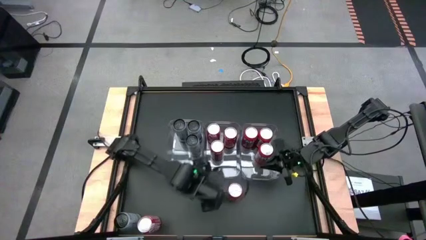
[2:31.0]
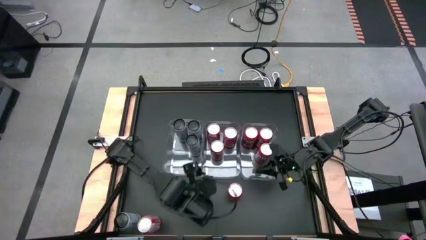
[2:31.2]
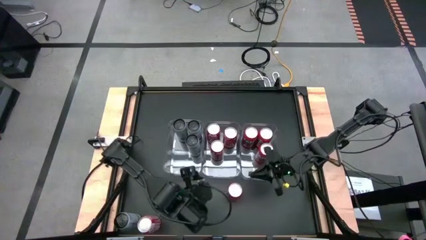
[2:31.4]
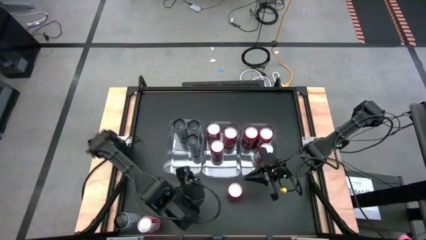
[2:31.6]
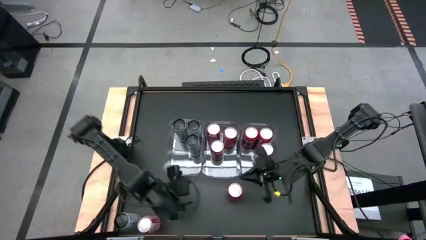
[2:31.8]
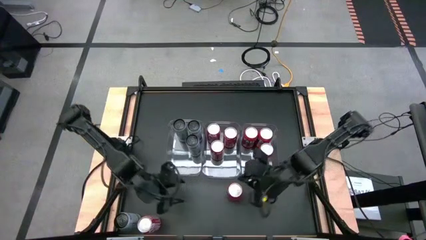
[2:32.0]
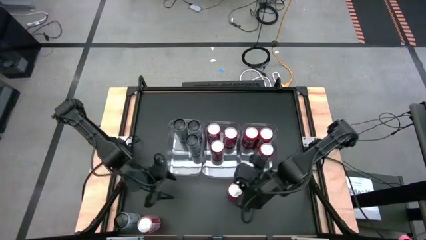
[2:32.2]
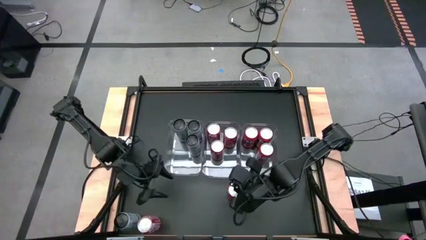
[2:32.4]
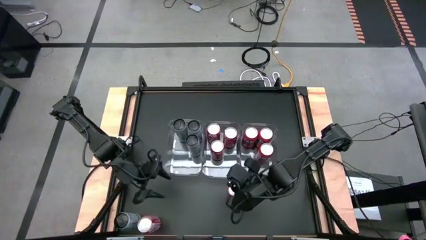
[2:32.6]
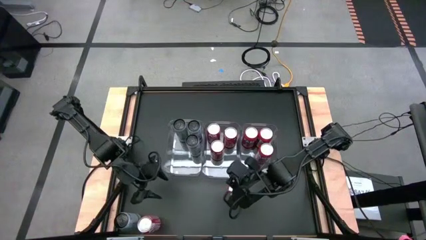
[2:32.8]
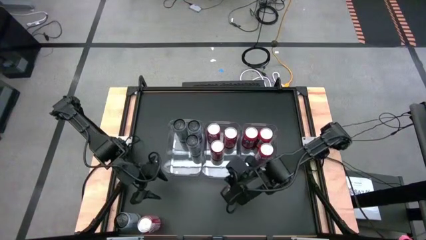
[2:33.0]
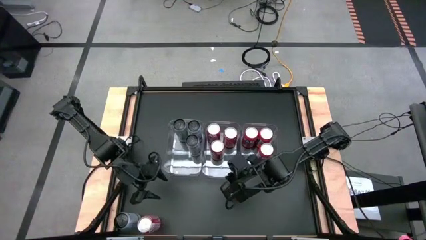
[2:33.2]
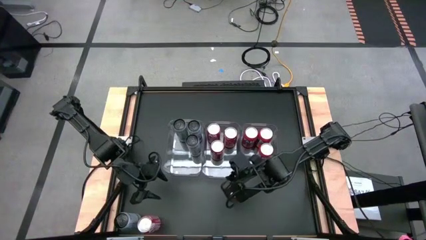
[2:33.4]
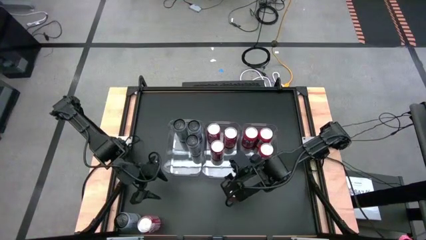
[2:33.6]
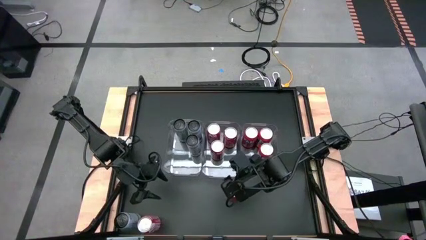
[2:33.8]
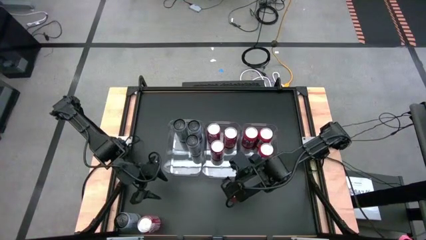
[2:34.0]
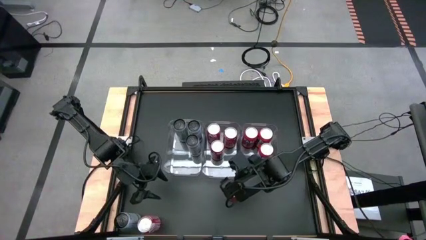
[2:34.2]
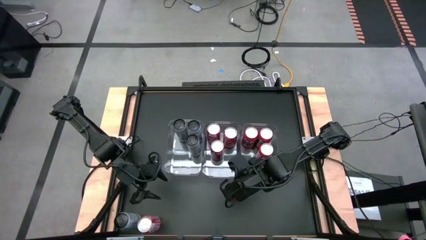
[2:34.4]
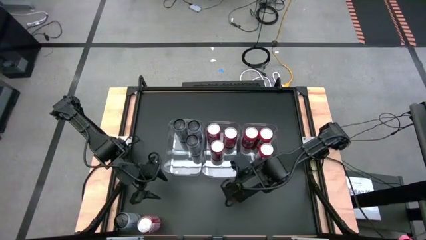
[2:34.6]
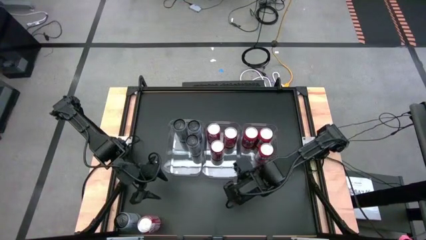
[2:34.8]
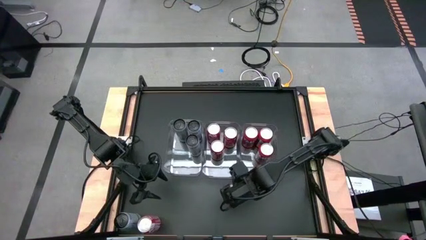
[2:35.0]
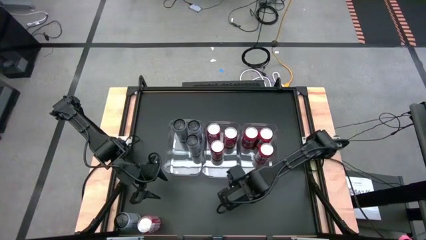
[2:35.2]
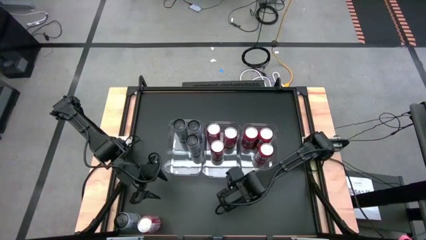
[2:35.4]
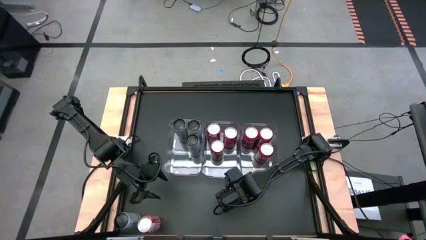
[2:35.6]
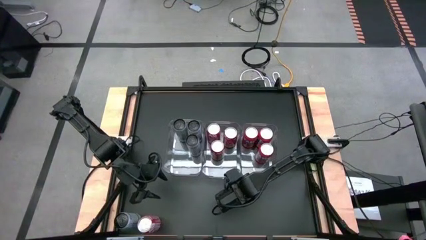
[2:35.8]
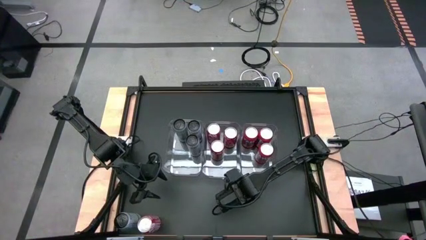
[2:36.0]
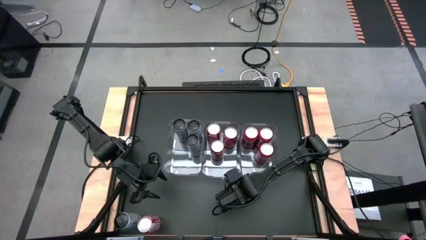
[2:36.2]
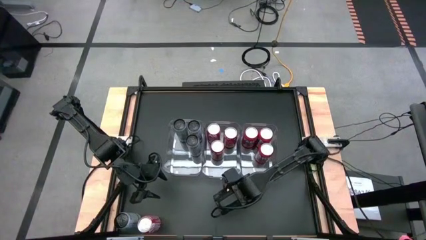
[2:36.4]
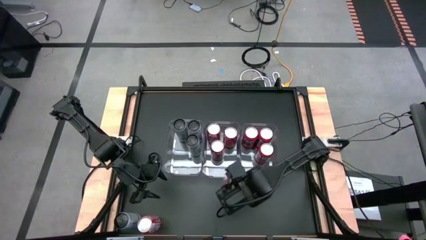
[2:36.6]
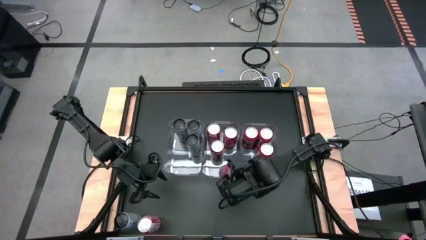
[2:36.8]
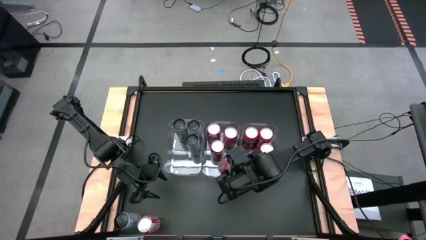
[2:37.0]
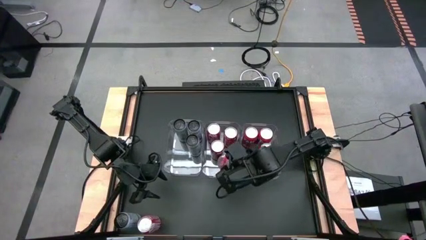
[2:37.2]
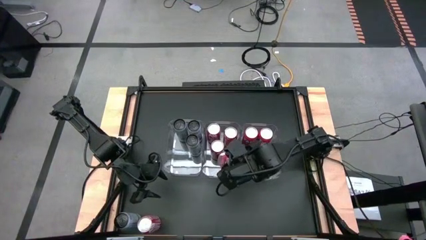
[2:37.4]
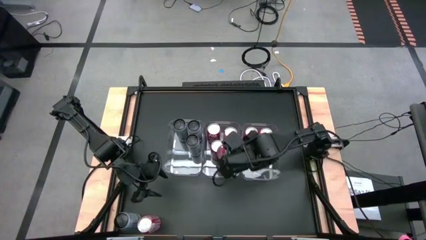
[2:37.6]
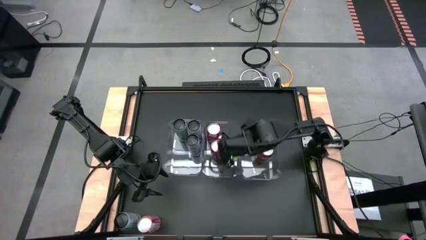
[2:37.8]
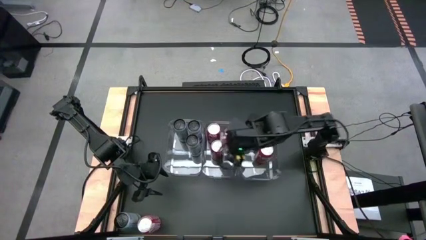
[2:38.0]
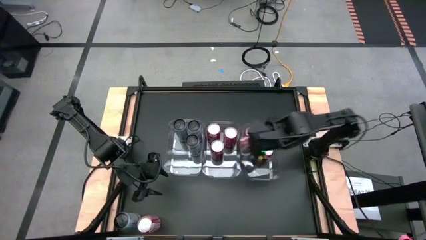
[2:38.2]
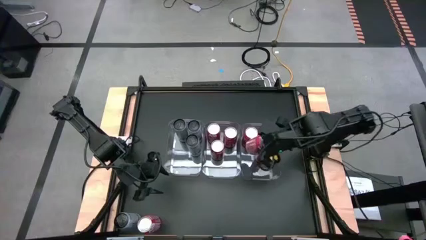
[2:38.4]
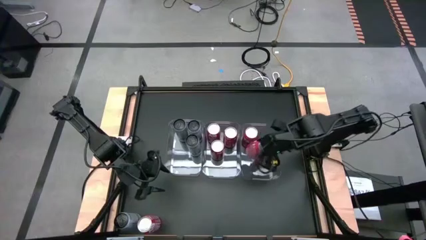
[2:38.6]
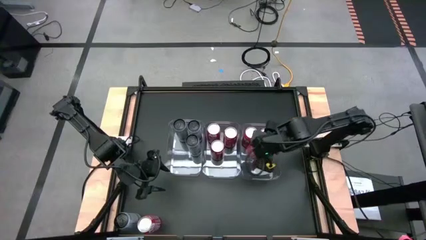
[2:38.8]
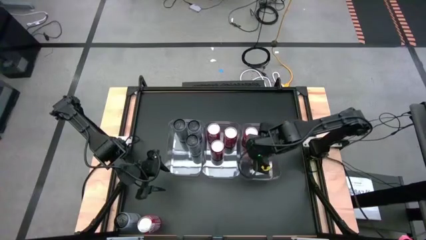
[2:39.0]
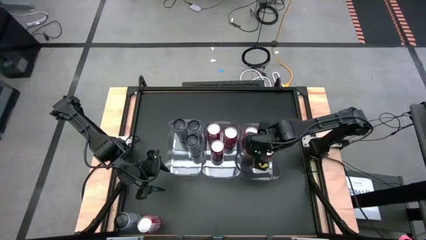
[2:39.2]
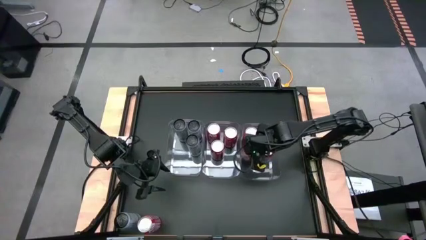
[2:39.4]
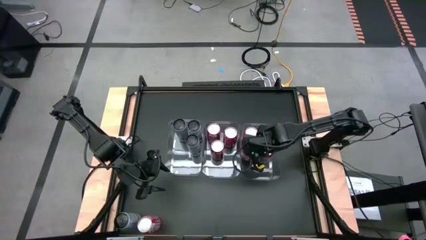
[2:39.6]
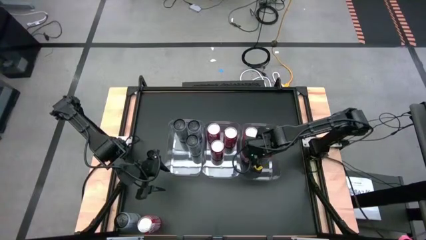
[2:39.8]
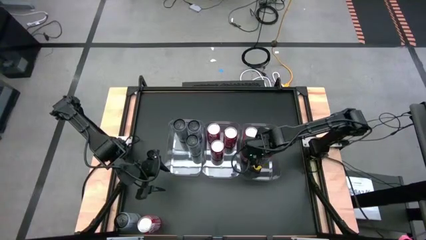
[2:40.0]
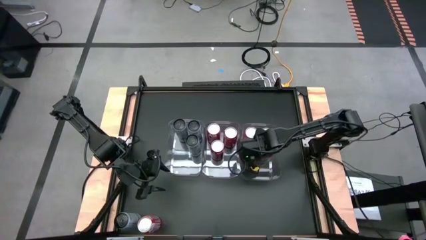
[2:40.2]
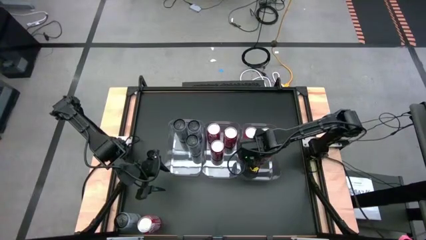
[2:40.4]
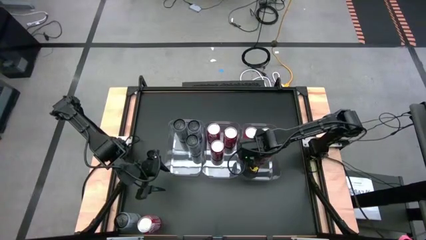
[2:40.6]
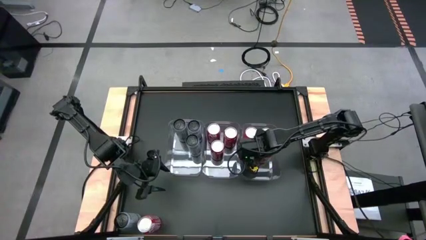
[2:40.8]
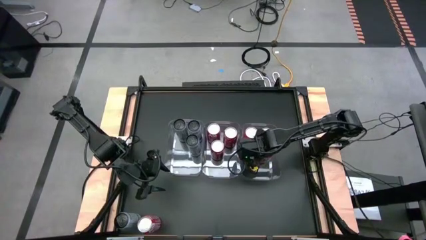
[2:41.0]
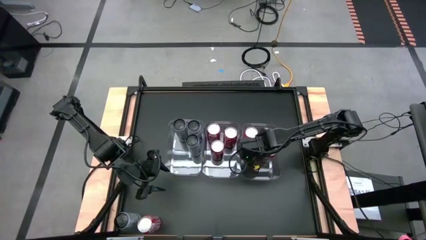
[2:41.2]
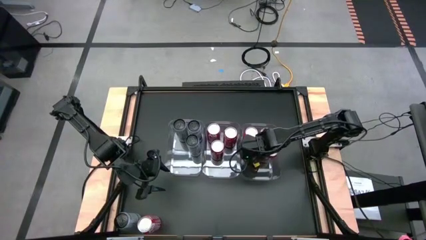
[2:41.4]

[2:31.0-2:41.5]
Task: Sort soda cans
Put the red soda can into the right transparent bin

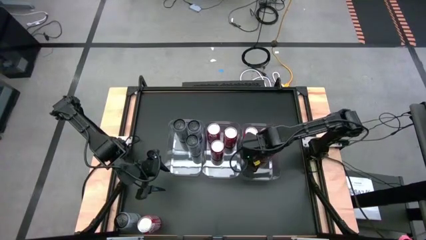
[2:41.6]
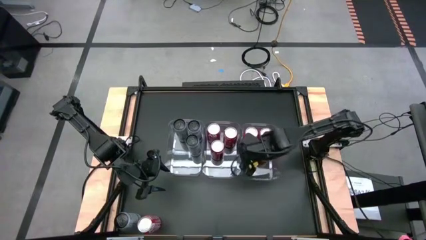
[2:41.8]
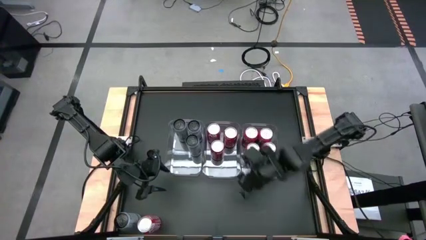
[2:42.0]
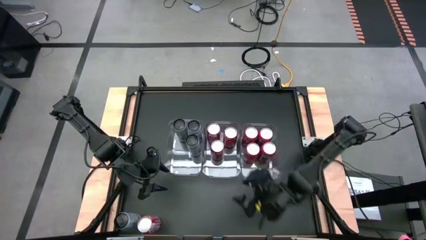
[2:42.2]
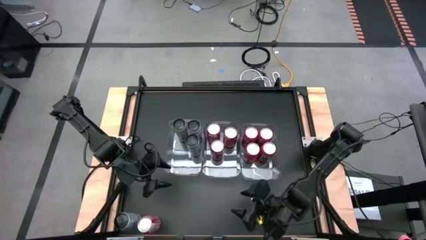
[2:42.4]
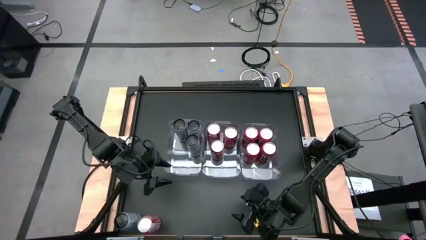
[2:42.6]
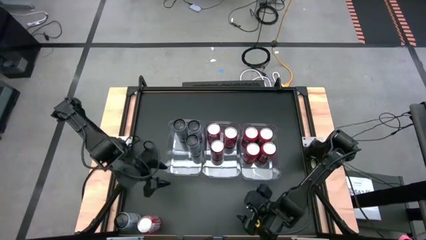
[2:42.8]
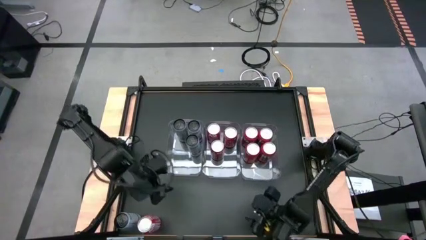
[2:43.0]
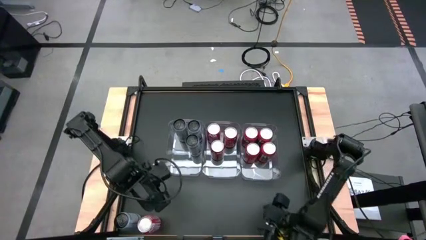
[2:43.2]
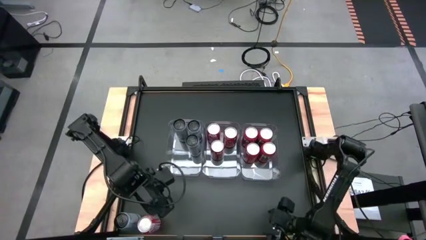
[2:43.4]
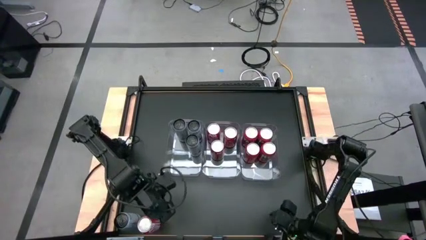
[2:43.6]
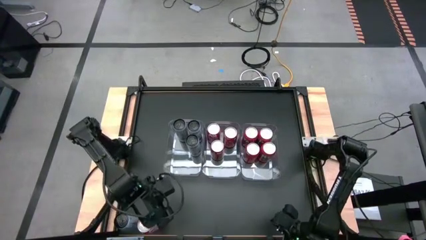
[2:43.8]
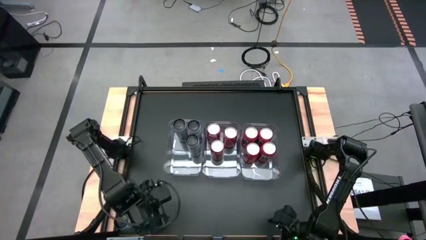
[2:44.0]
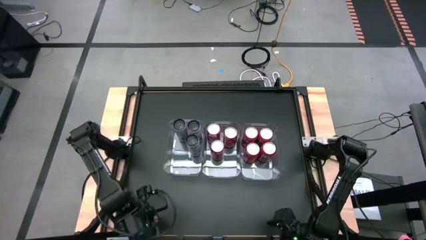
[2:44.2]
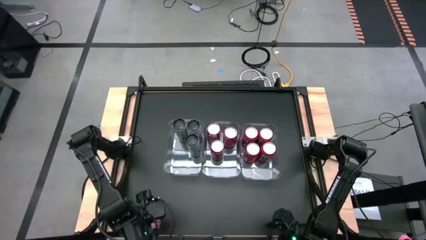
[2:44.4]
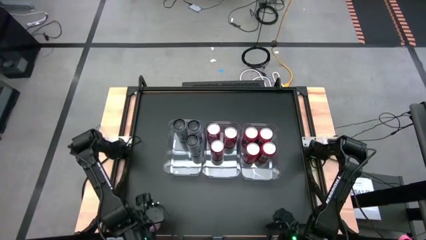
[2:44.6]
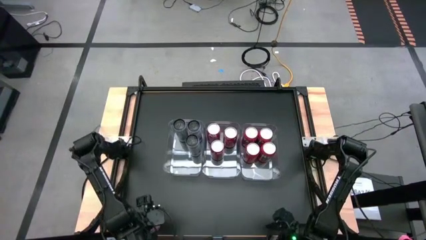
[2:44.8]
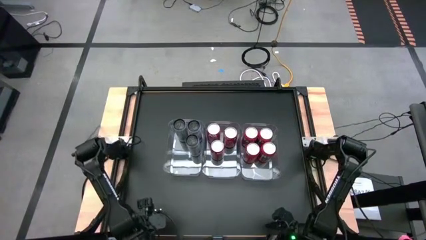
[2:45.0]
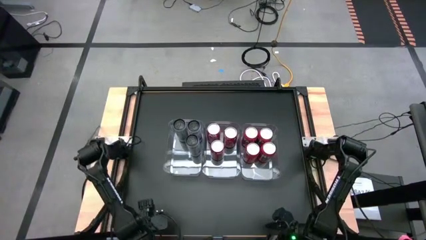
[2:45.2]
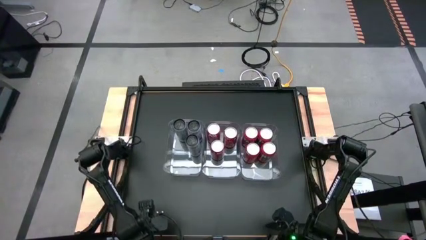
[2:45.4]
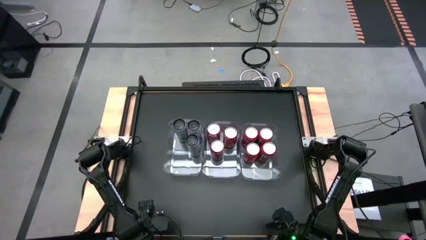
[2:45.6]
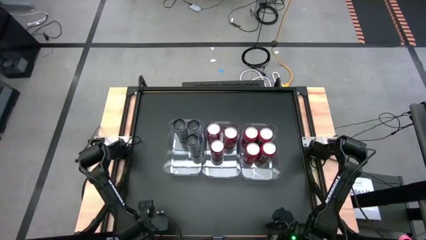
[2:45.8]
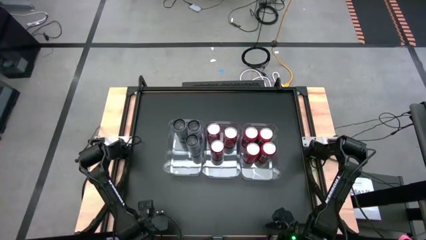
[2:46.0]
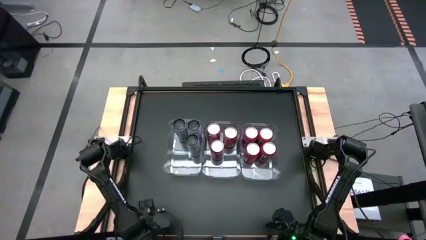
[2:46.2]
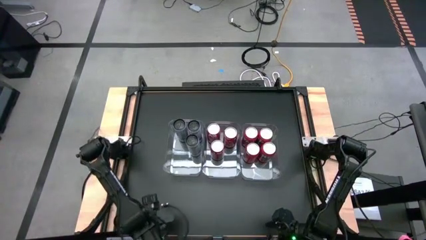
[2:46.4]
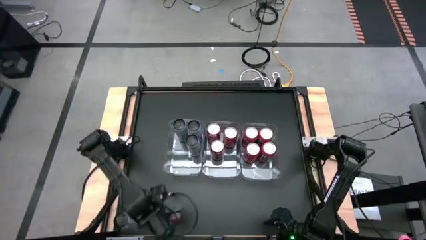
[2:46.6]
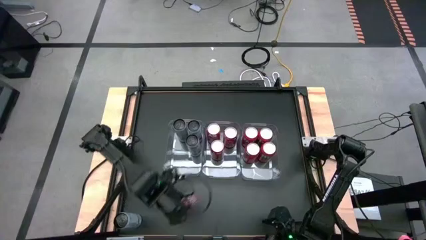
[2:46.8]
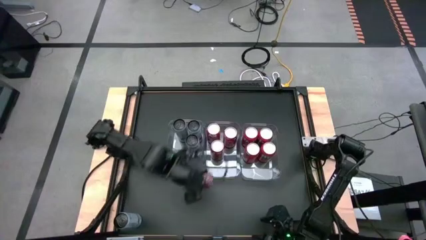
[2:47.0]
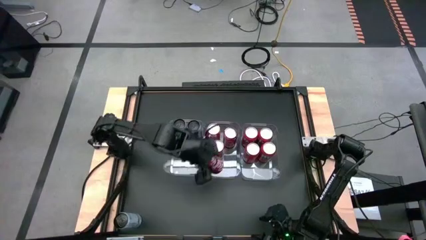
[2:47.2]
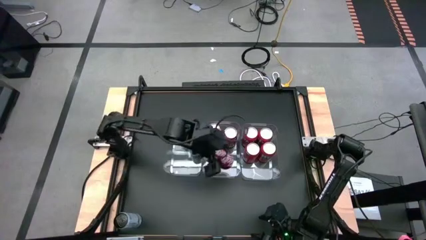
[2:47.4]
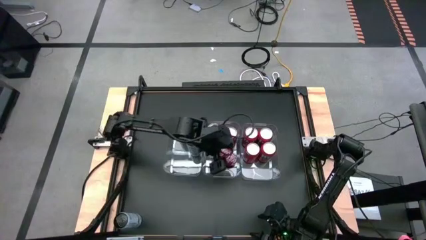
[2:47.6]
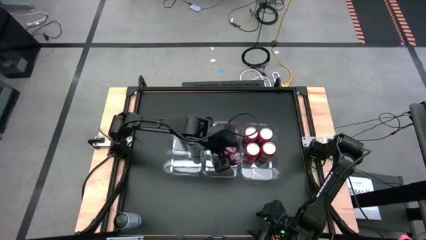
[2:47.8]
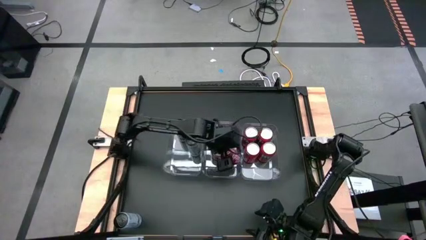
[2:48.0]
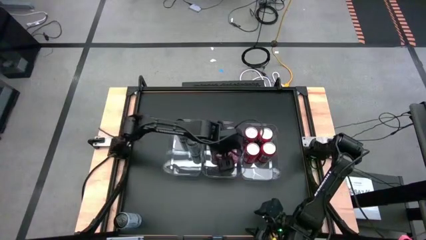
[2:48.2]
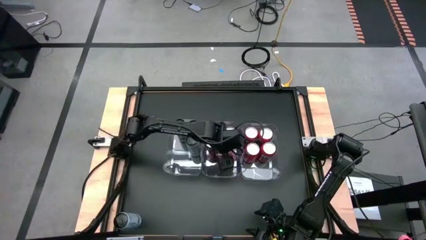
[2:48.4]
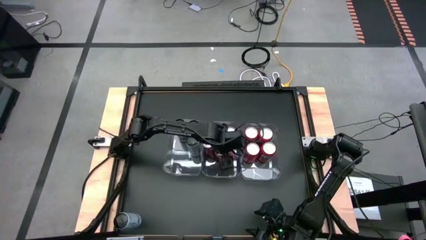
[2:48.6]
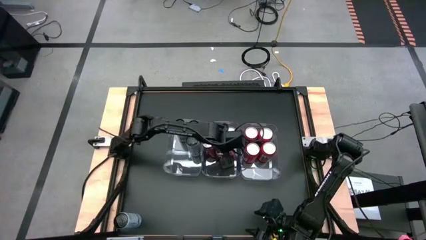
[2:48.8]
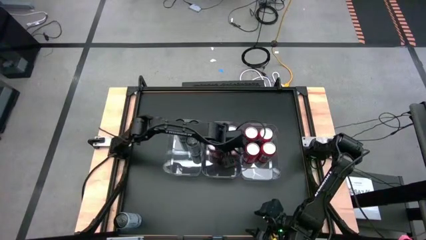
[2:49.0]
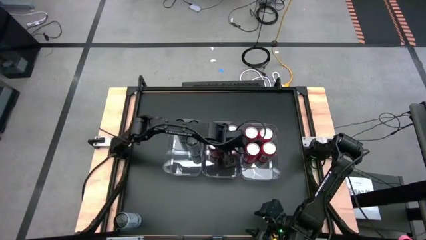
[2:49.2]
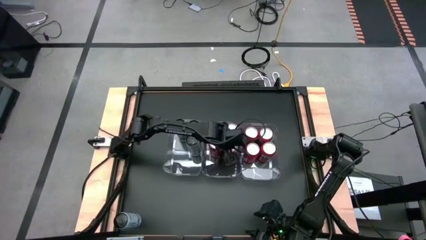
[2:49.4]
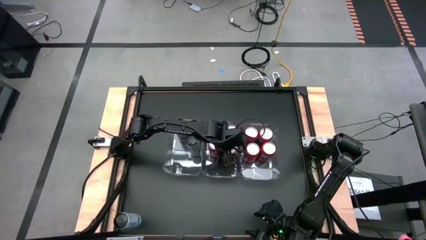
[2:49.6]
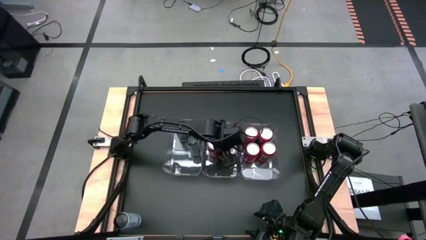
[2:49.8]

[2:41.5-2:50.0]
Put the red-white soda can into the center transparent bin
